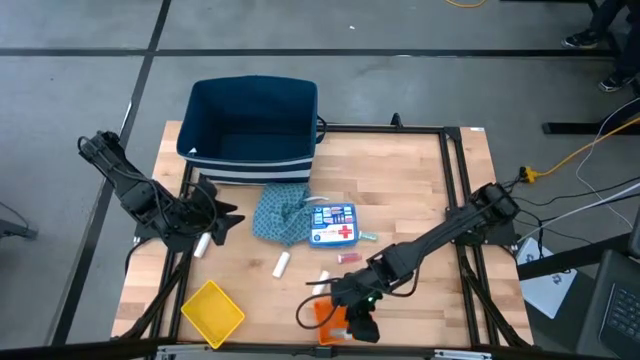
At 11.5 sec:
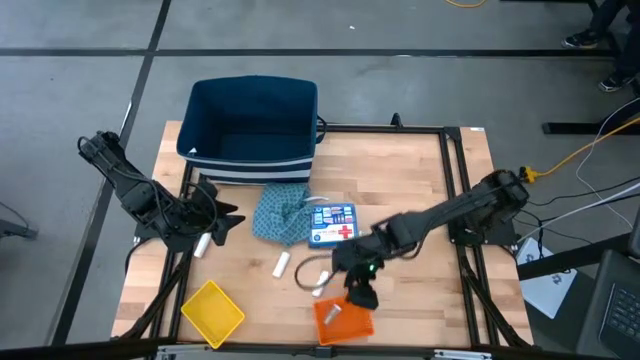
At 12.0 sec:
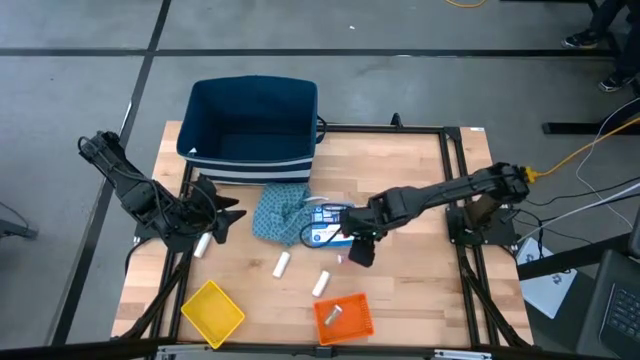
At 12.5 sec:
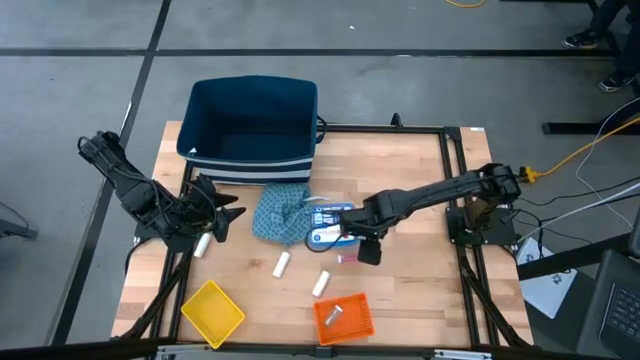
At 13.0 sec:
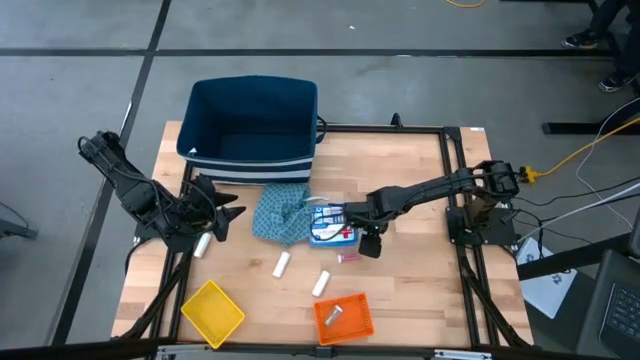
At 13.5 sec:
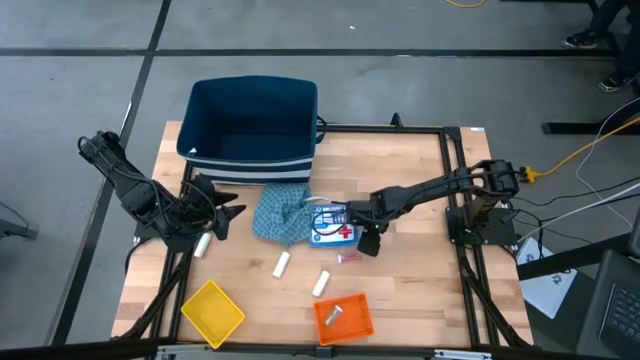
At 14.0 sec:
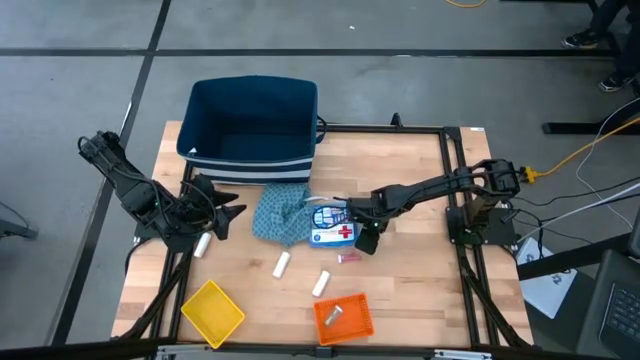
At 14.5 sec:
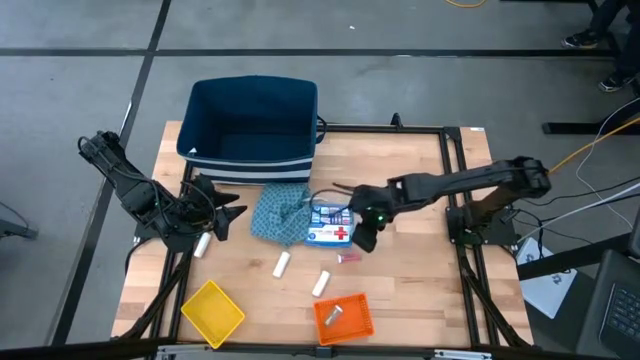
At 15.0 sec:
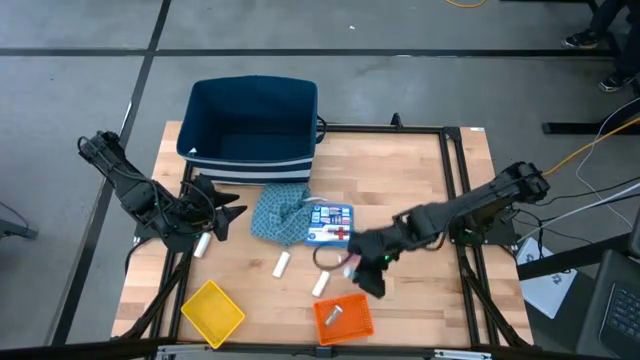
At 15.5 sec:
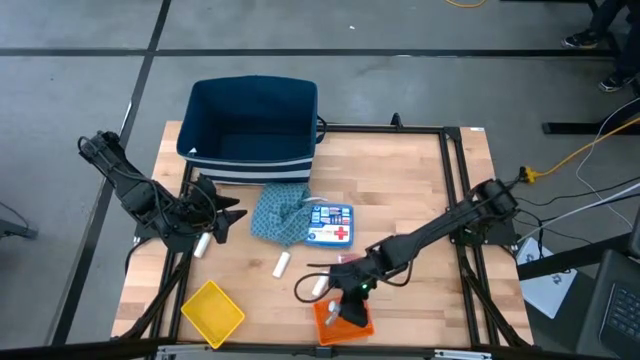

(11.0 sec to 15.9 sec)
Task: Pick & Place Medicine items
Put the blue pill bottle into the orange bin

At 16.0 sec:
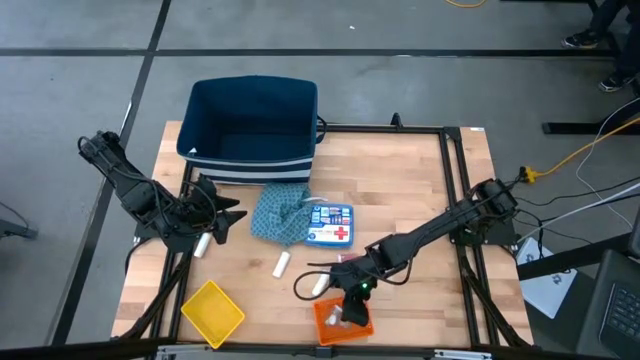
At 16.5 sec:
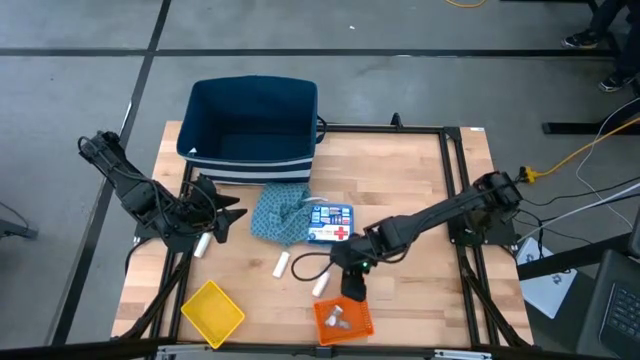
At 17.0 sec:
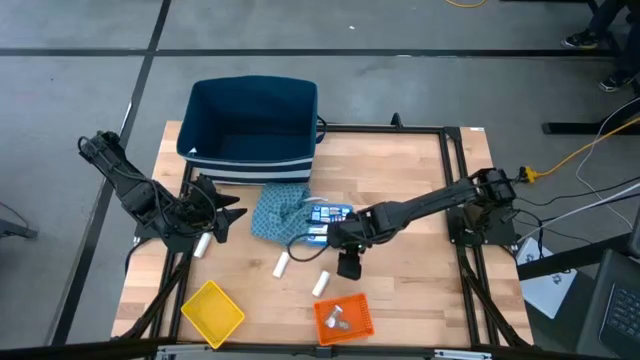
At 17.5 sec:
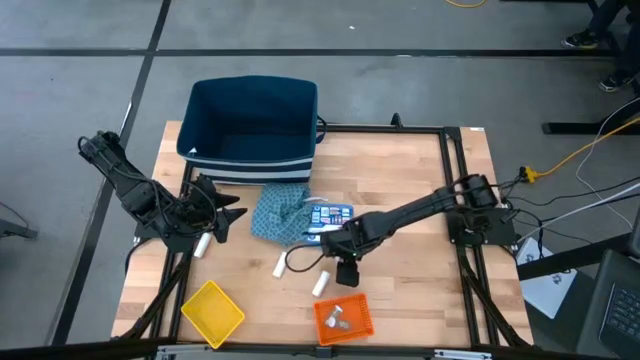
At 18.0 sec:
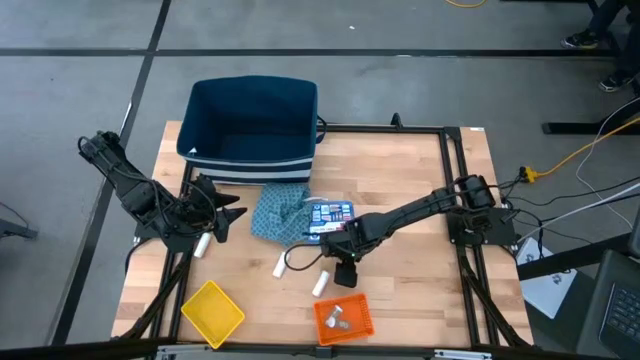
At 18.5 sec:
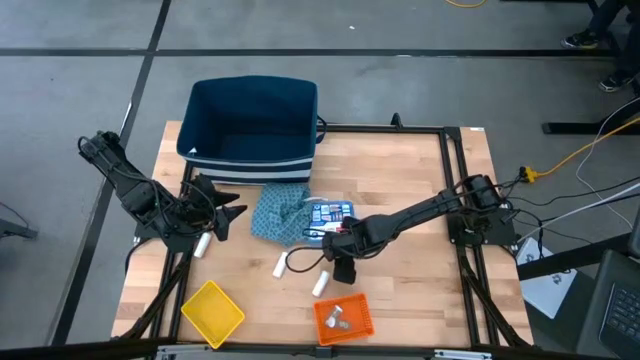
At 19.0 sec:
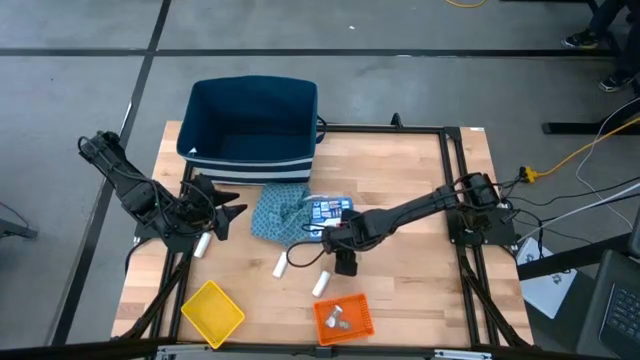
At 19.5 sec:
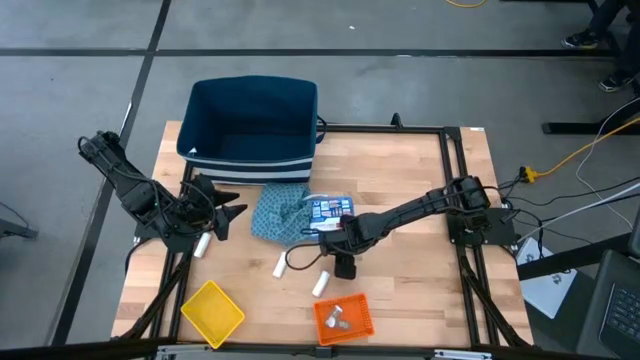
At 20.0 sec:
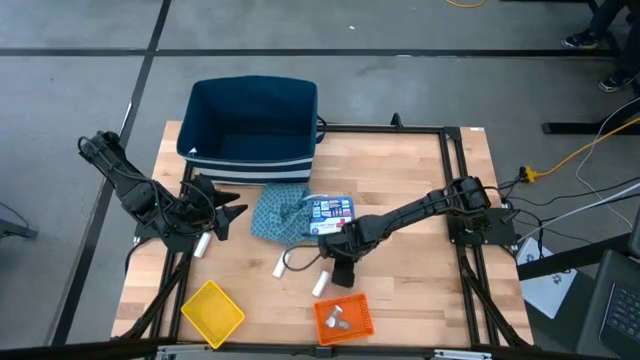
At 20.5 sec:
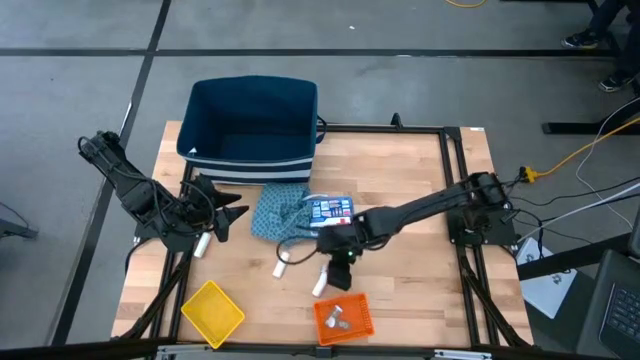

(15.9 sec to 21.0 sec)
Put the pink pill bottle into the orange bin

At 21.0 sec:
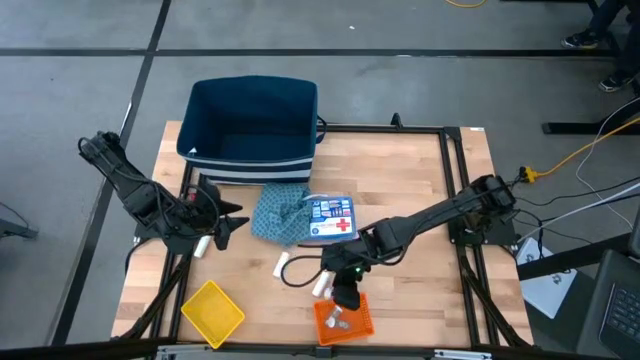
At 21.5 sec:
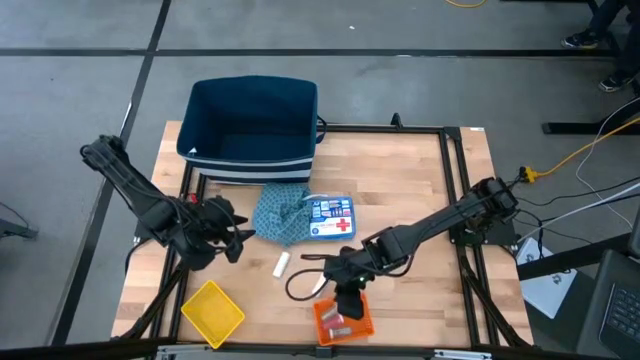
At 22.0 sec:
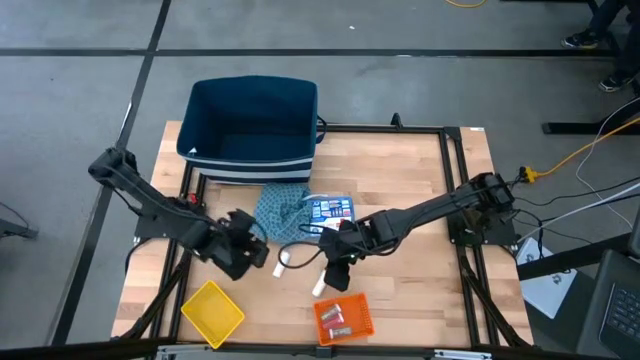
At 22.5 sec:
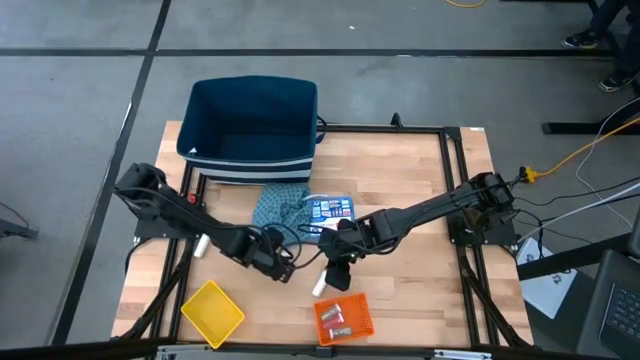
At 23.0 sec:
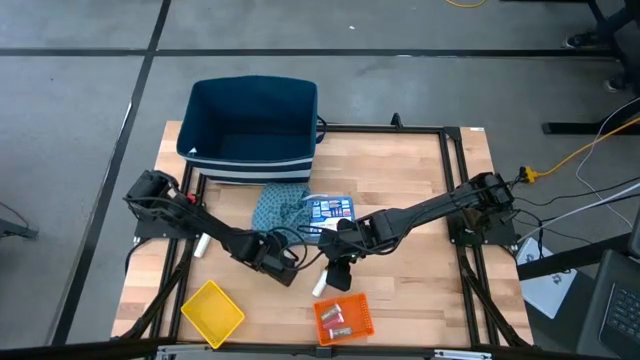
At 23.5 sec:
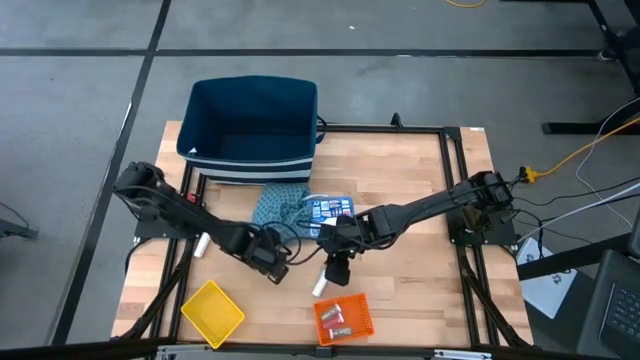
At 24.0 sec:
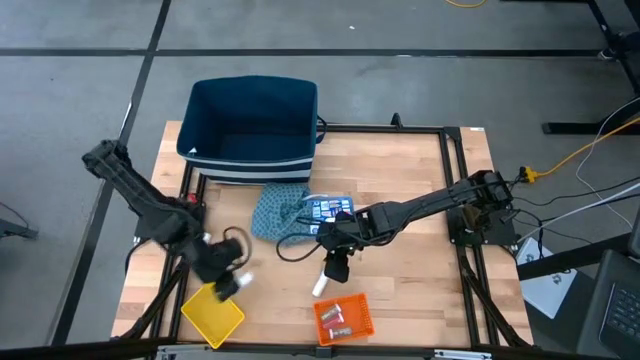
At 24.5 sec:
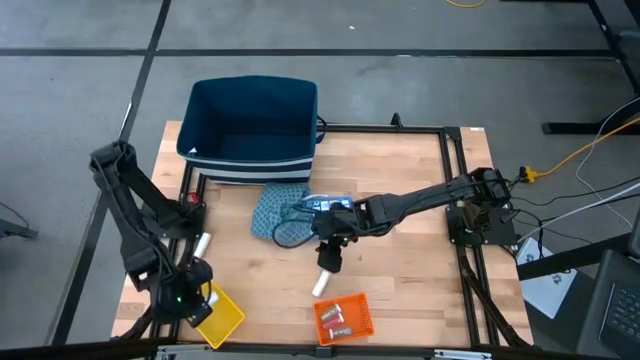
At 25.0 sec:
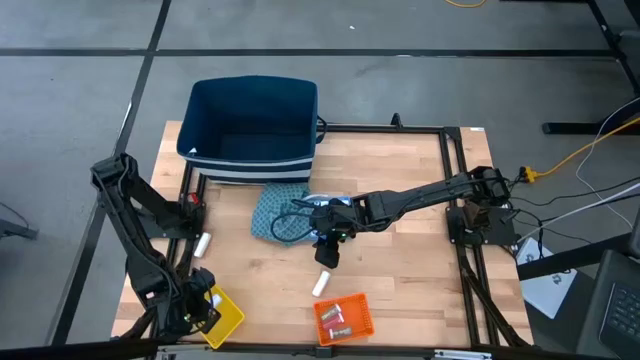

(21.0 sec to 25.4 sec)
Put the middle white rolled gauze into the yellow bin

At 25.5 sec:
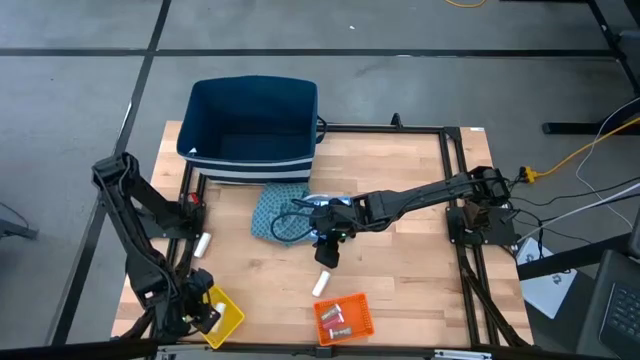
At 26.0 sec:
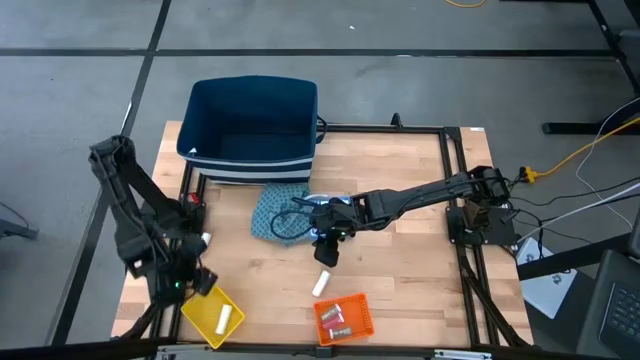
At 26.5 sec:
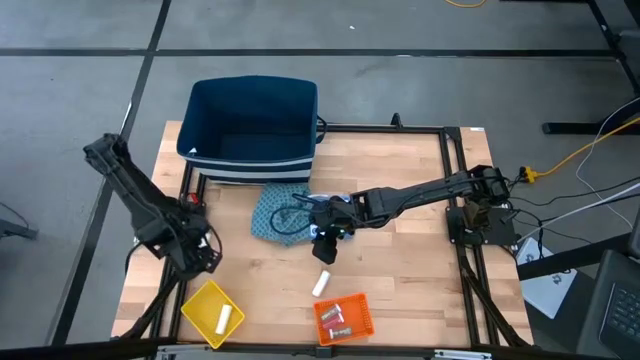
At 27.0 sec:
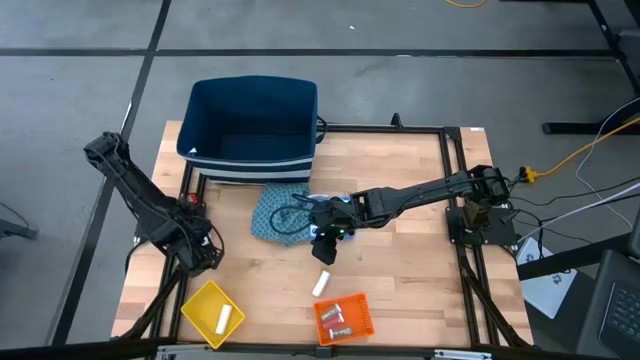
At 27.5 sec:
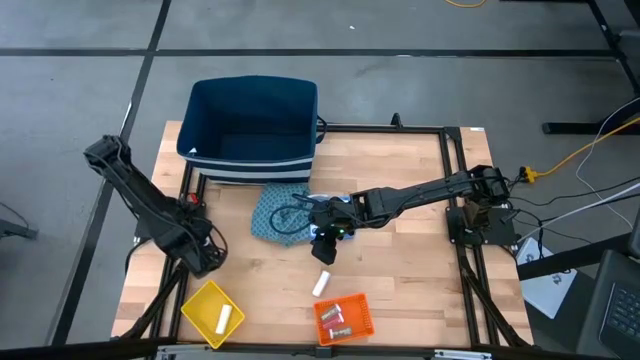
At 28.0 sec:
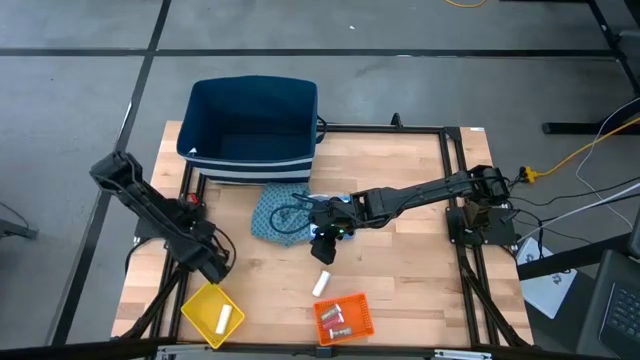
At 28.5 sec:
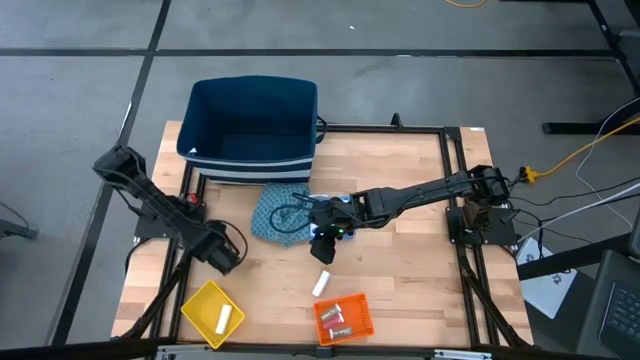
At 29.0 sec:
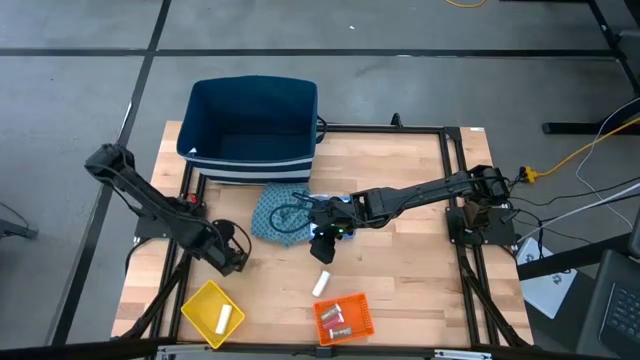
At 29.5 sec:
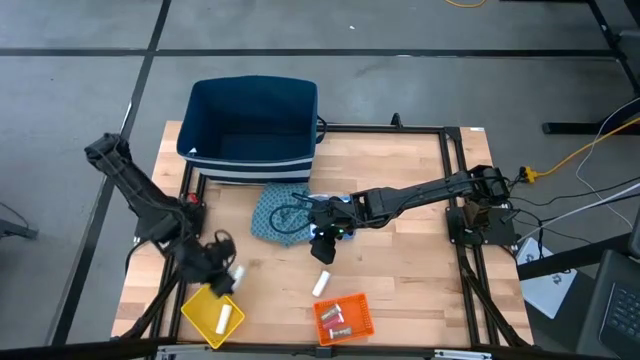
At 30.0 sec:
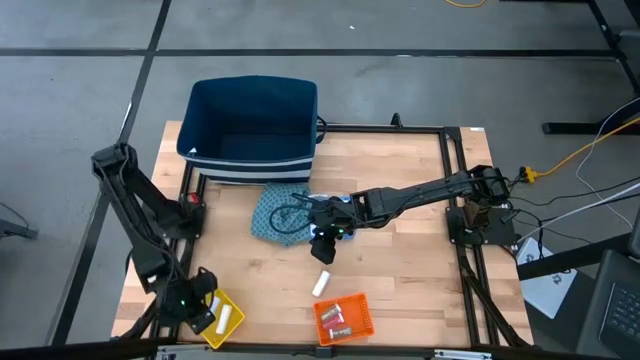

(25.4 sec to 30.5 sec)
Put the left white rolled gauze into the yellow bin

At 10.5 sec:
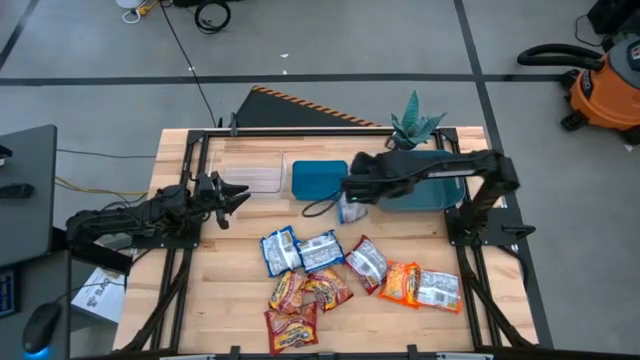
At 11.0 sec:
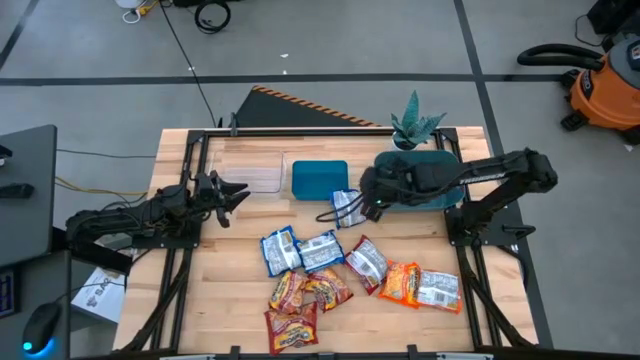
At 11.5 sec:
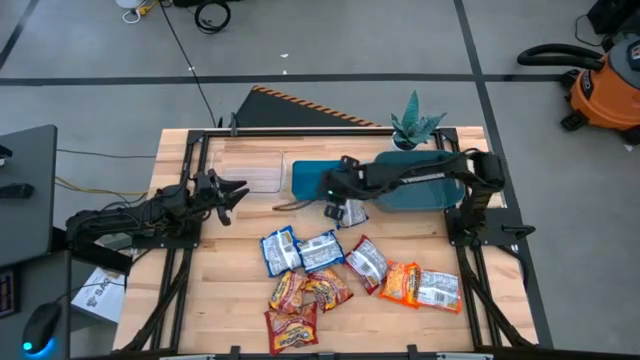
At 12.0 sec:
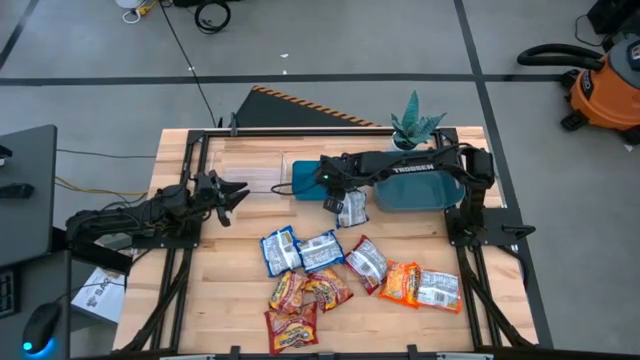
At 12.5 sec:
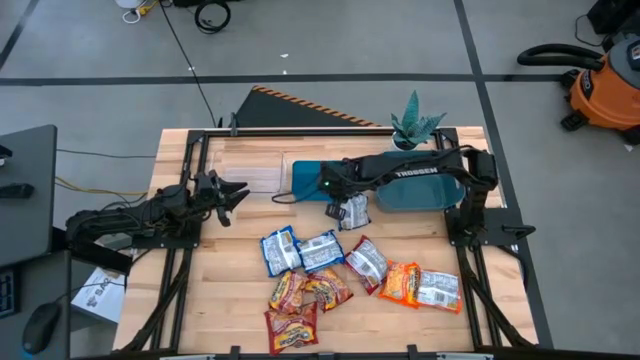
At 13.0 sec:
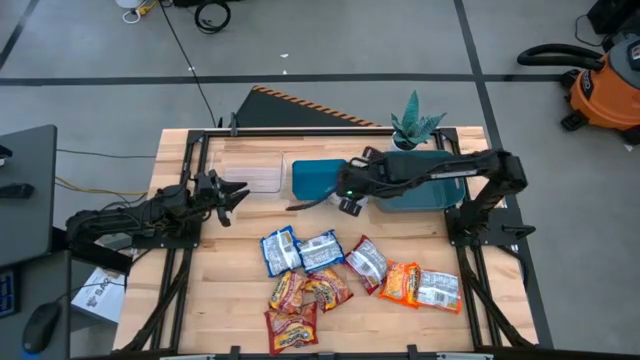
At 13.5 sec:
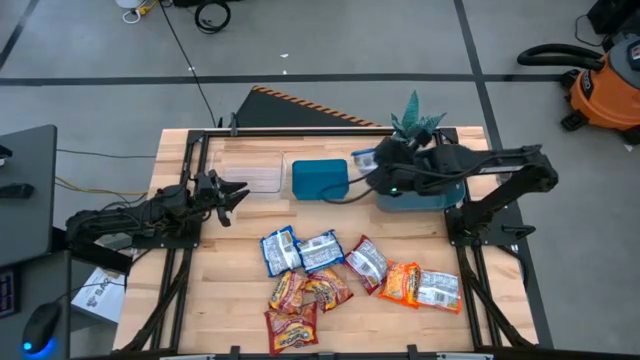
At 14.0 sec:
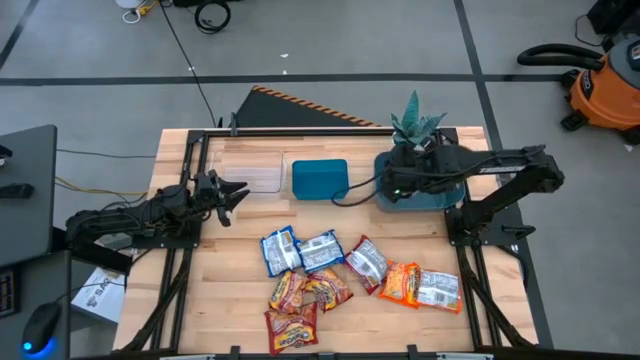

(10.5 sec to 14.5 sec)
Task: Sort Maruchan noodles
Put the blue noodle pack into the green bin
